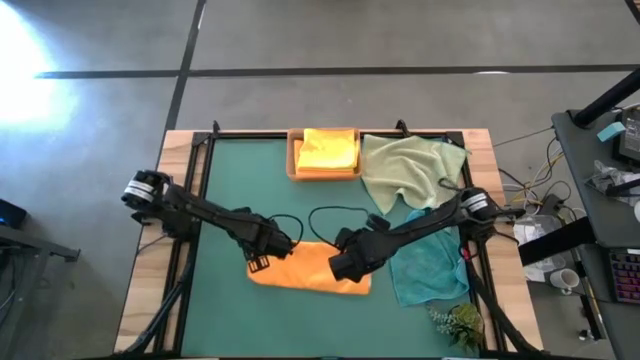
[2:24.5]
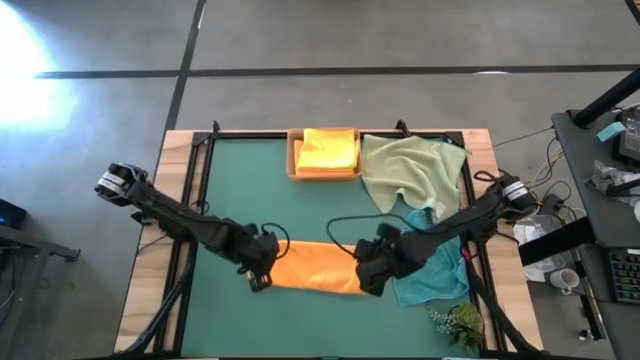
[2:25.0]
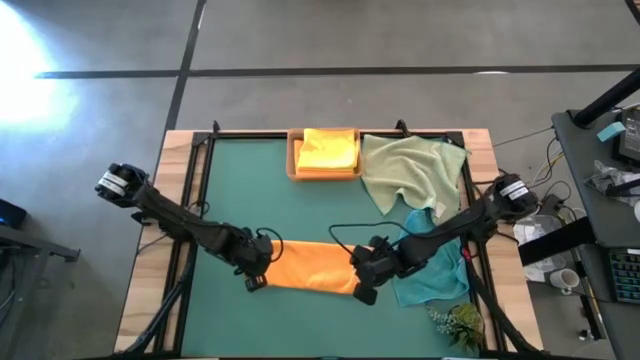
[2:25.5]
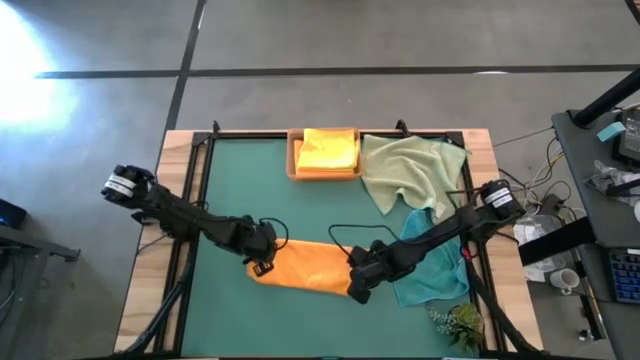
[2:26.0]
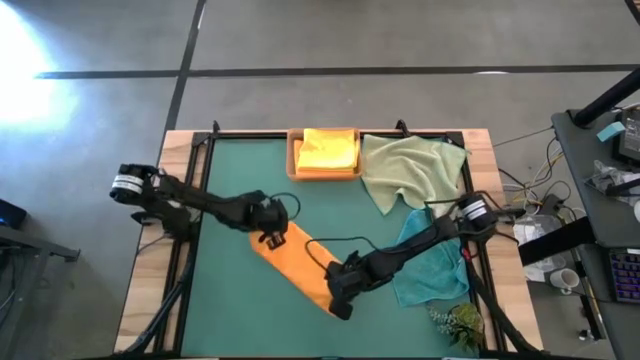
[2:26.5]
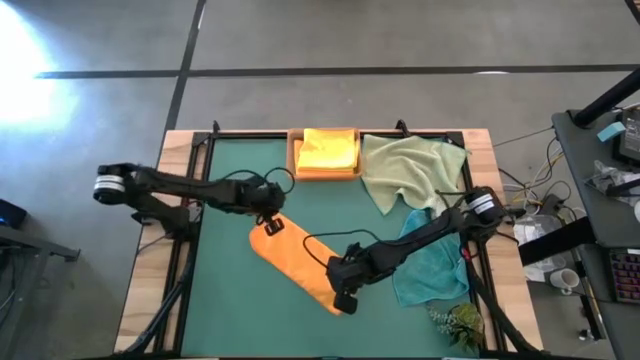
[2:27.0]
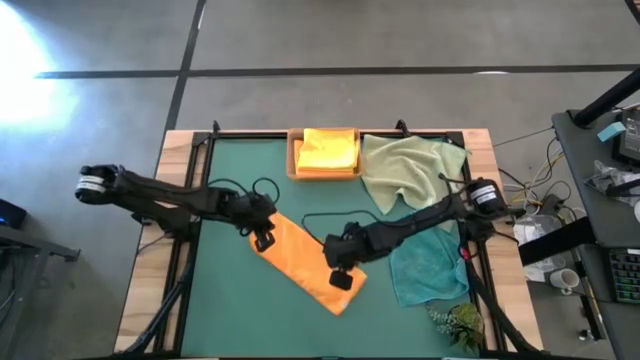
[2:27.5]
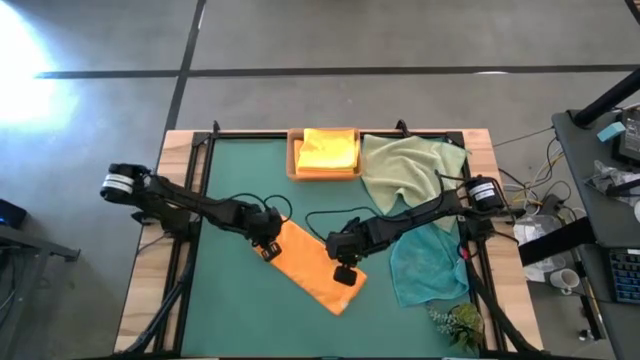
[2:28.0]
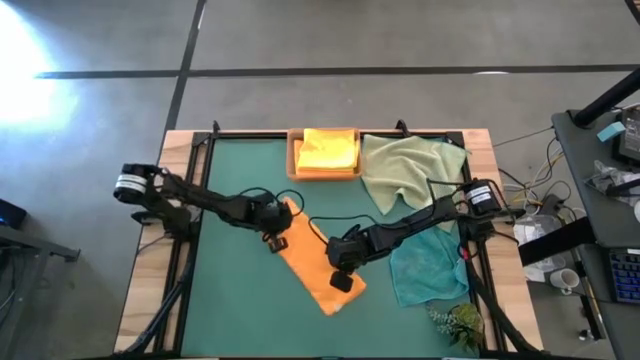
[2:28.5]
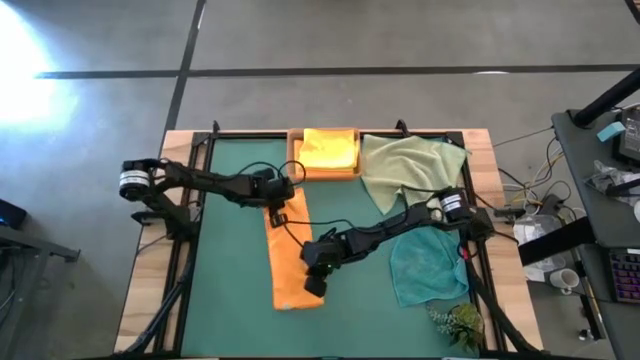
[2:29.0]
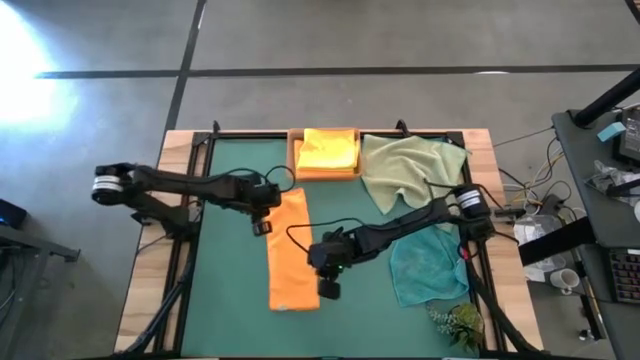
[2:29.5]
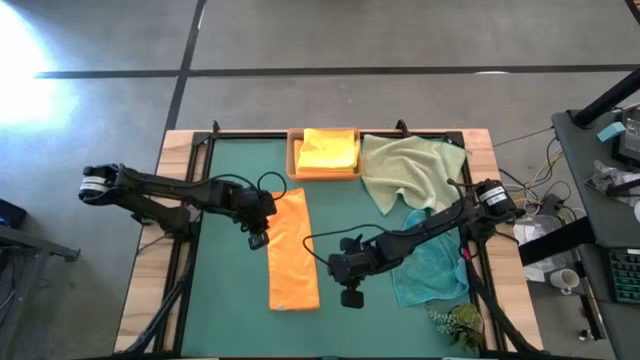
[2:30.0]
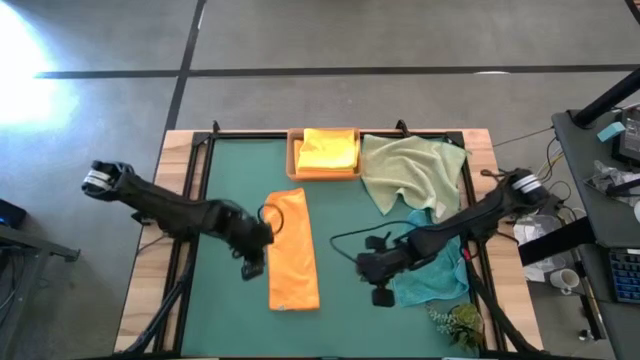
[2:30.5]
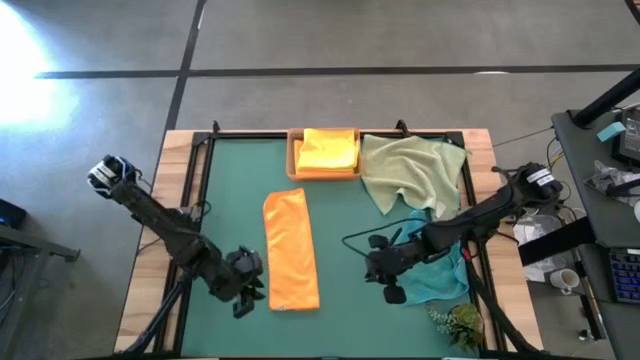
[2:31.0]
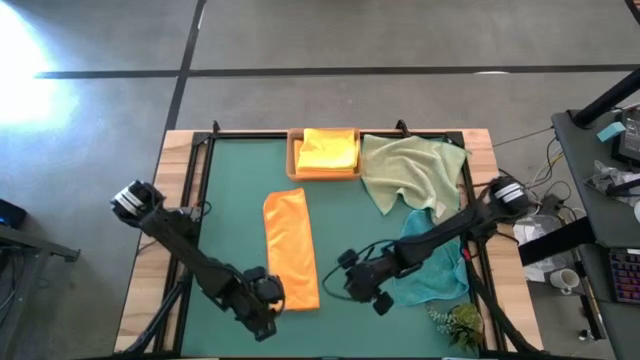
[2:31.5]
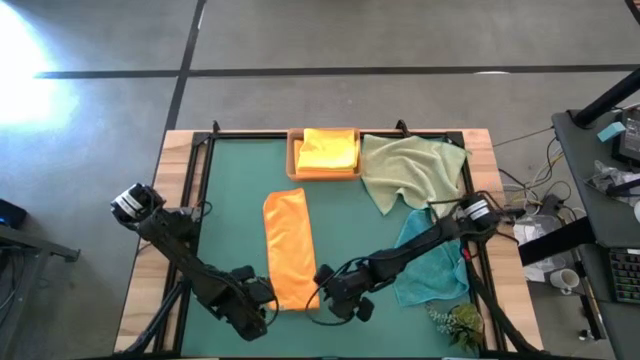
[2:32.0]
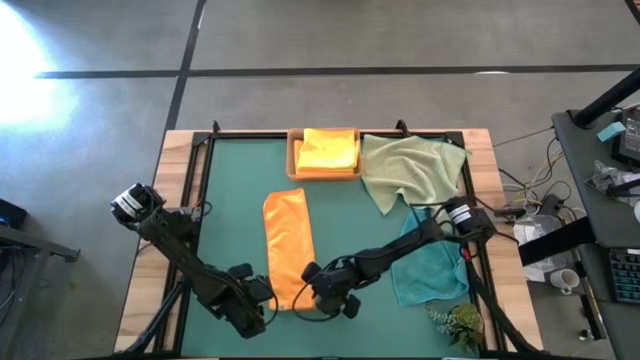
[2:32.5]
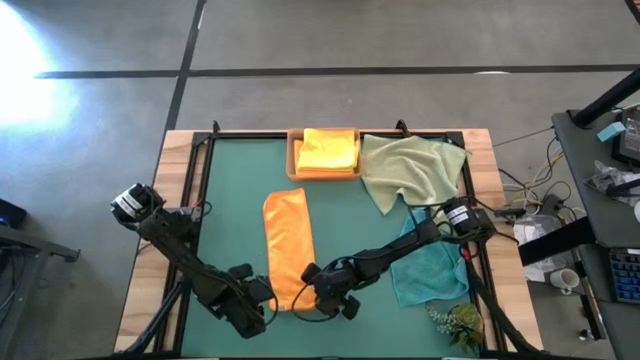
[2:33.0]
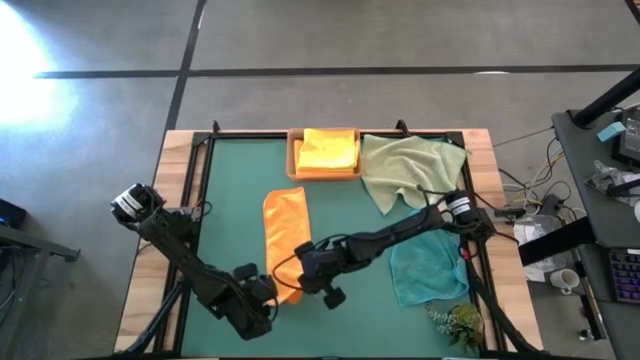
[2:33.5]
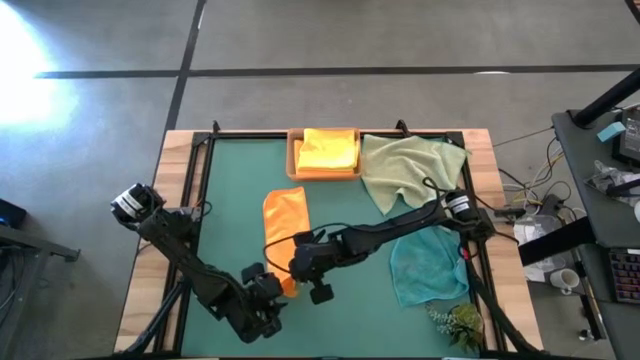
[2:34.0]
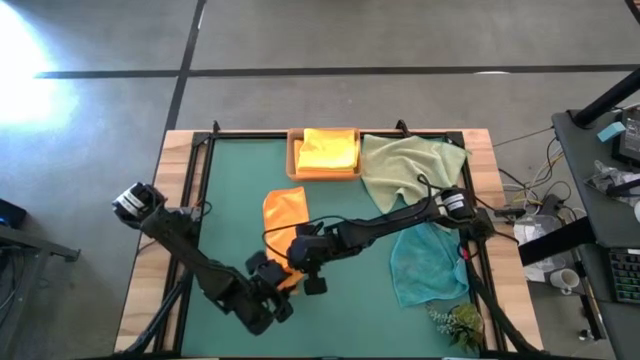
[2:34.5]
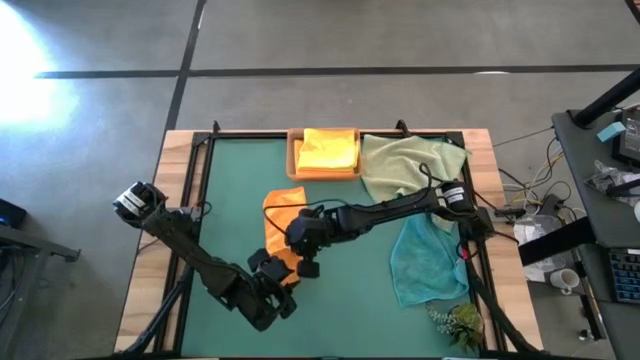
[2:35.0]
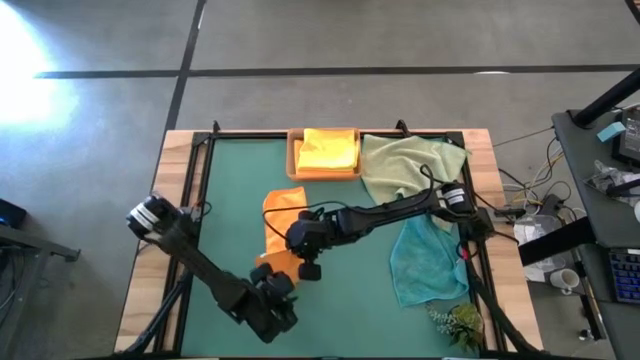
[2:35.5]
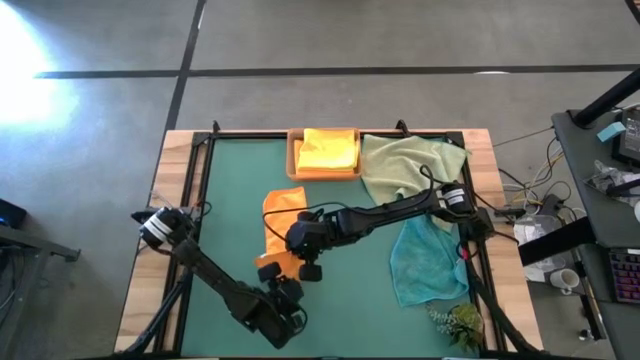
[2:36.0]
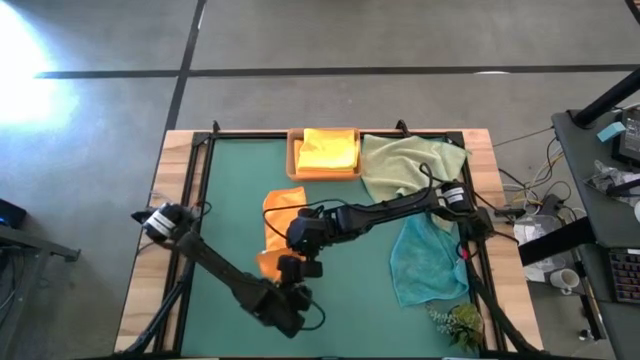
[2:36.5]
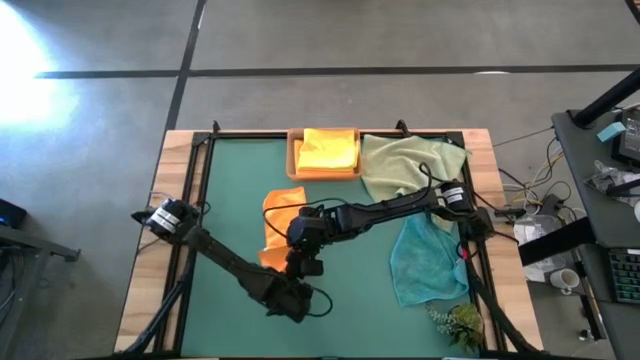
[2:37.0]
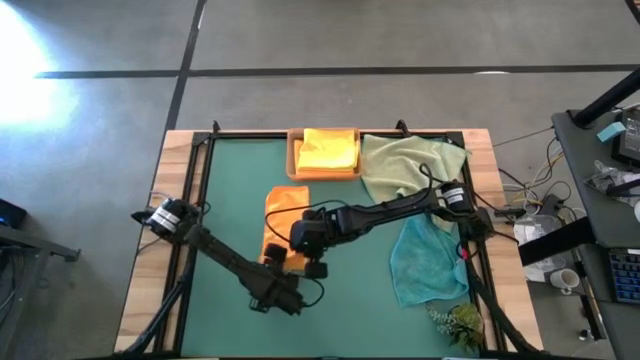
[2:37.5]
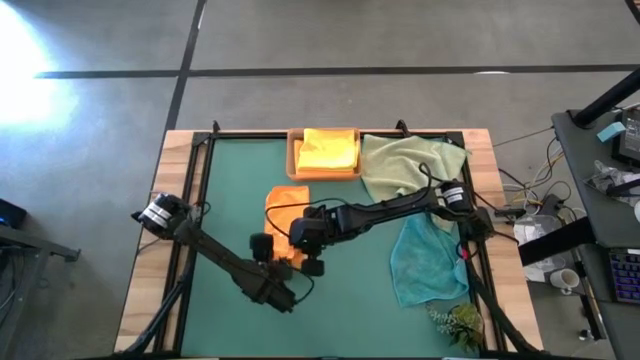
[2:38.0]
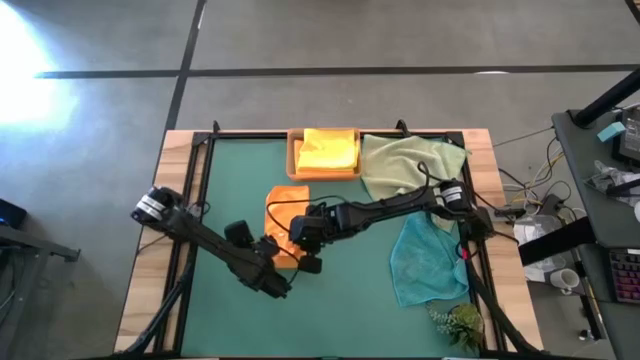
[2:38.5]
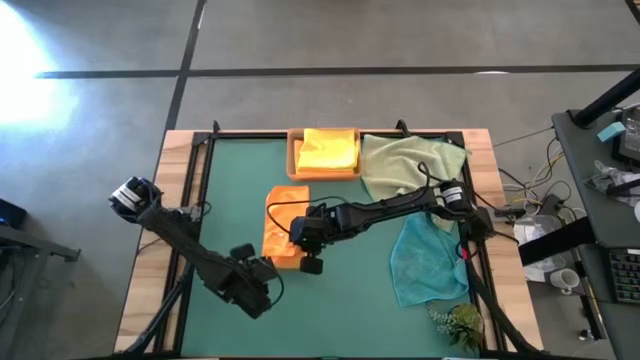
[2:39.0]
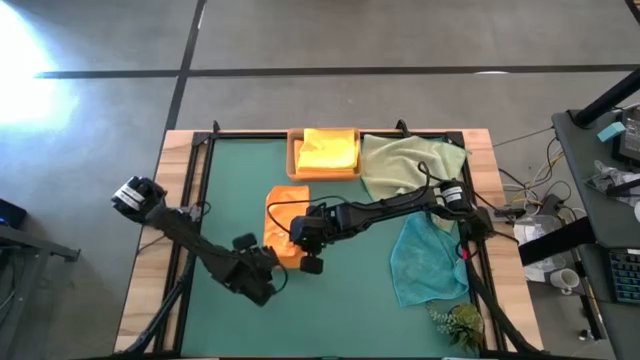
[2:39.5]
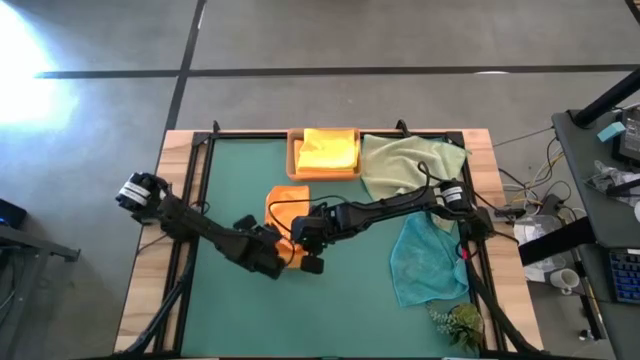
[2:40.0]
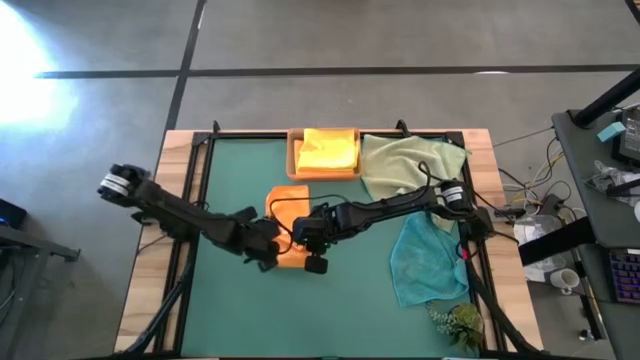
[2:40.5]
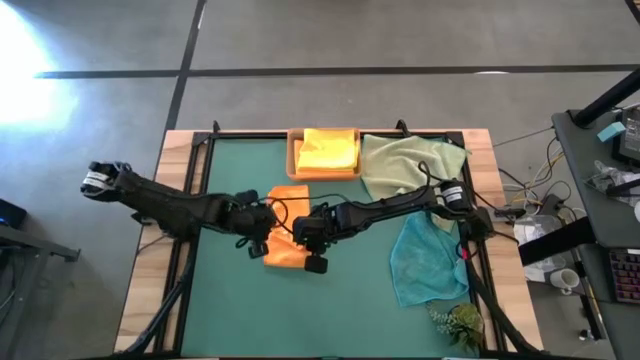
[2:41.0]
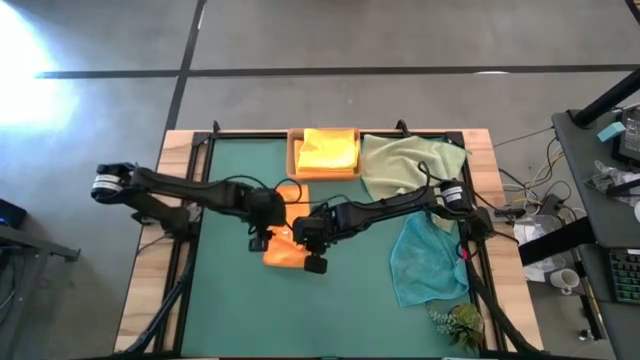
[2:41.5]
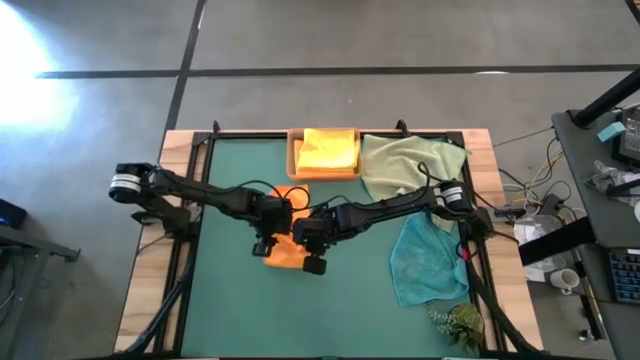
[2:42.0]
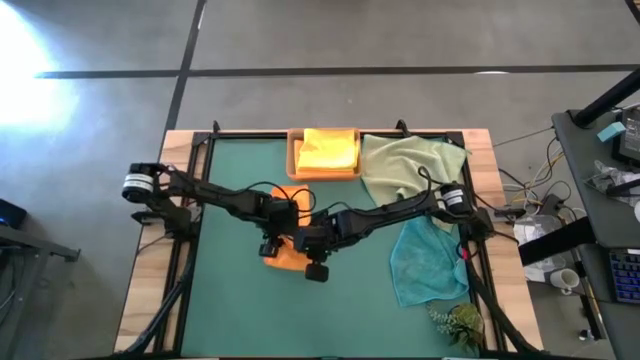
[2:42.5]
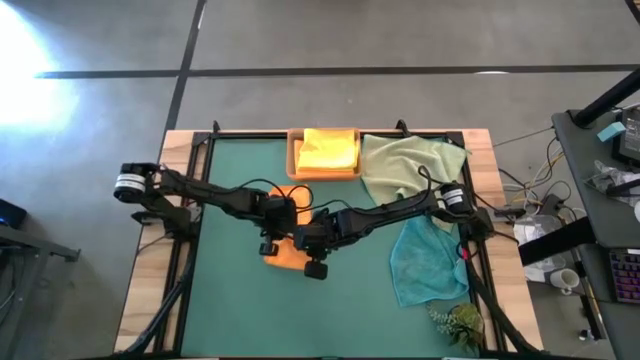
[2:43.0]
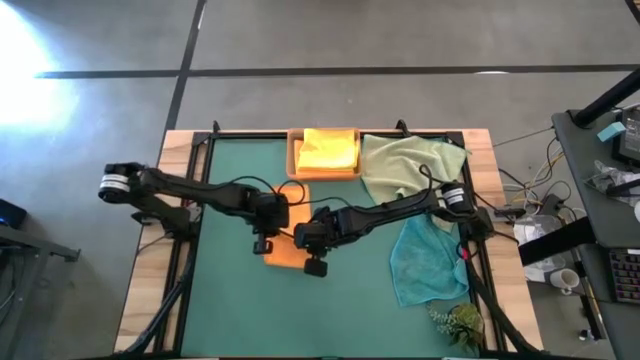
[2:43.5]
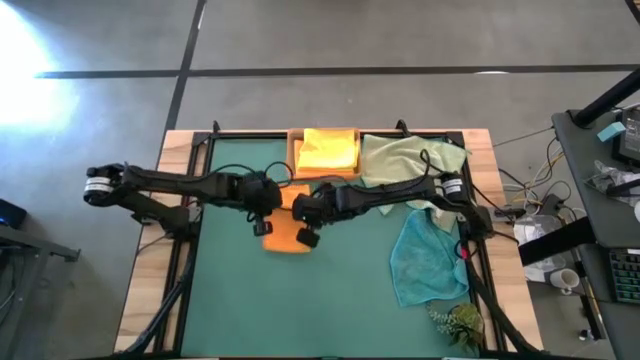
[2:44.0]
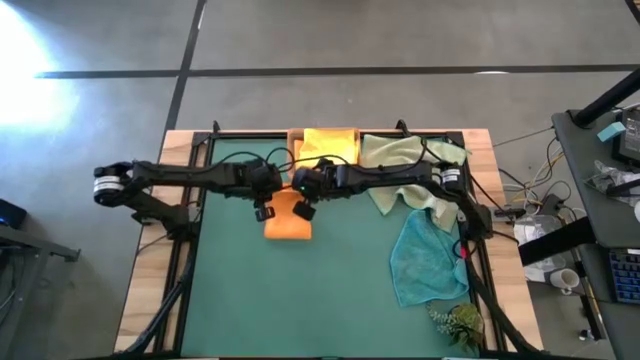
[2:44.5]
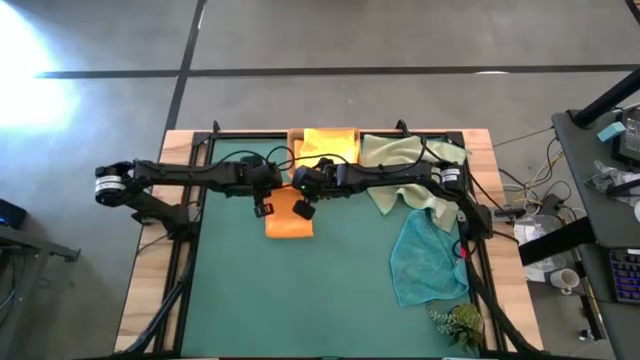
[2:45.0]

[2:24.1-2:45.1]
Task: Fold microfiber towels
Fold the orange towel
